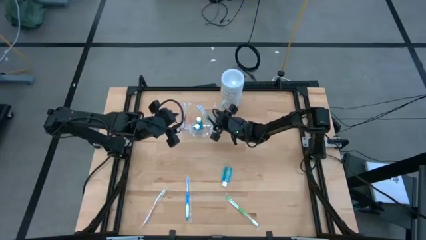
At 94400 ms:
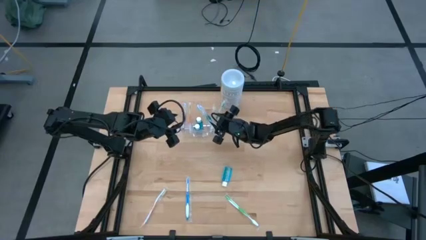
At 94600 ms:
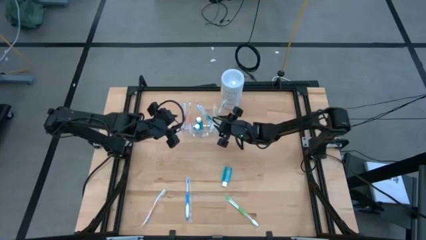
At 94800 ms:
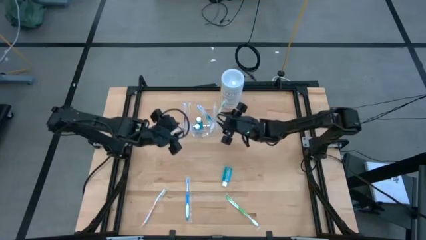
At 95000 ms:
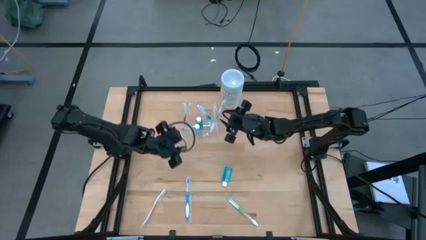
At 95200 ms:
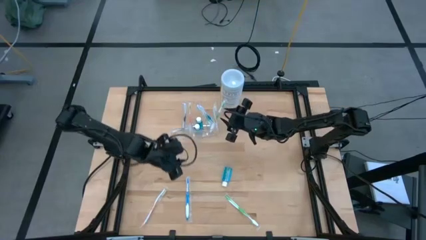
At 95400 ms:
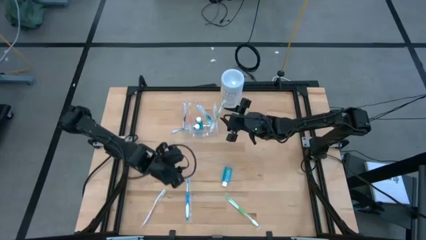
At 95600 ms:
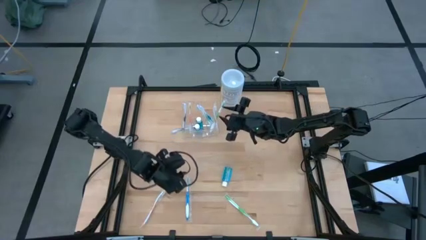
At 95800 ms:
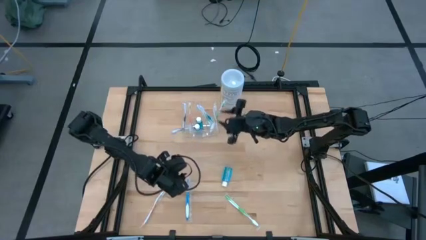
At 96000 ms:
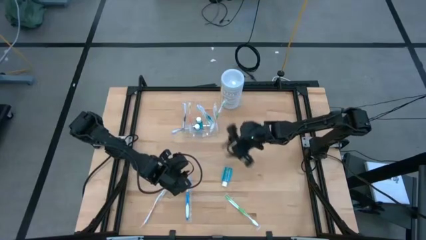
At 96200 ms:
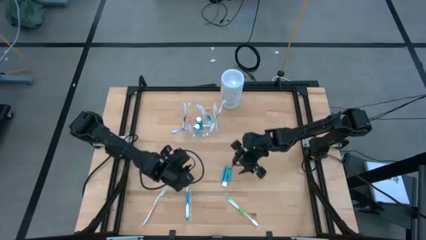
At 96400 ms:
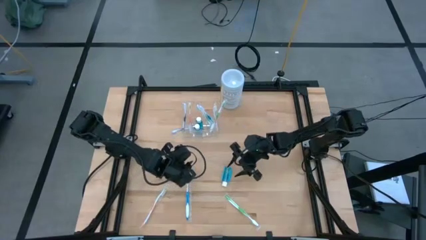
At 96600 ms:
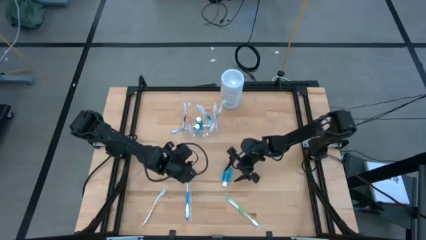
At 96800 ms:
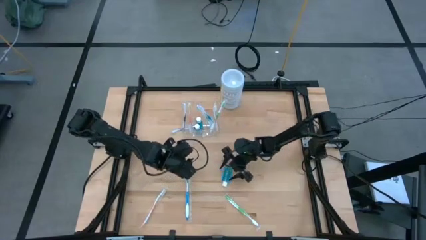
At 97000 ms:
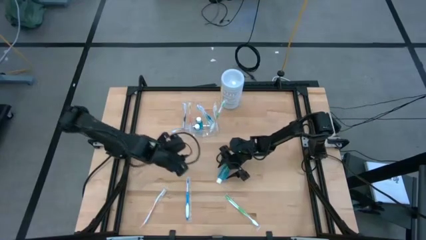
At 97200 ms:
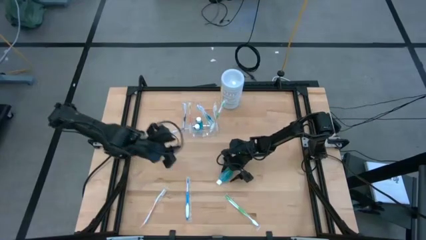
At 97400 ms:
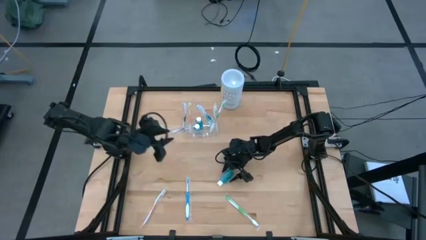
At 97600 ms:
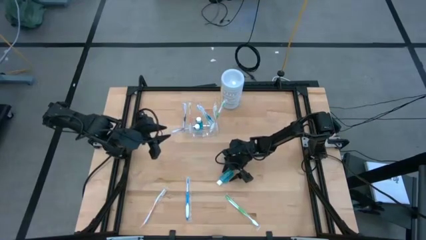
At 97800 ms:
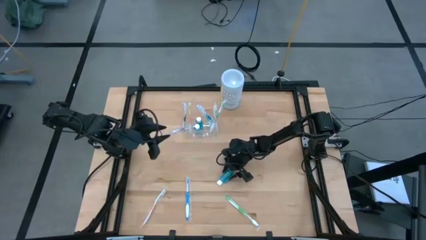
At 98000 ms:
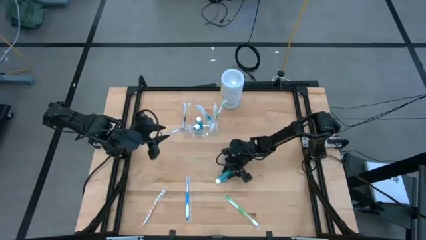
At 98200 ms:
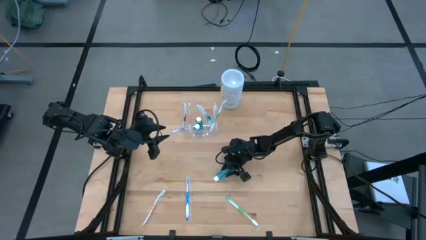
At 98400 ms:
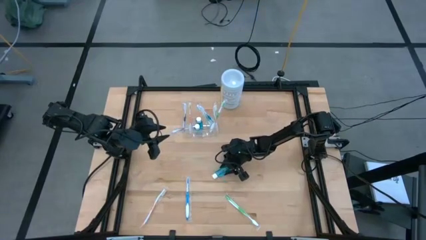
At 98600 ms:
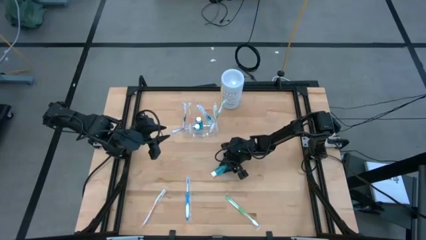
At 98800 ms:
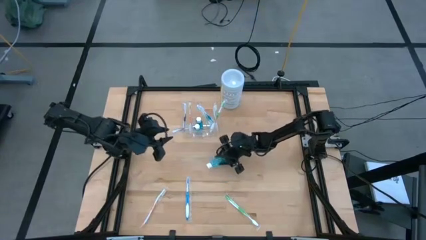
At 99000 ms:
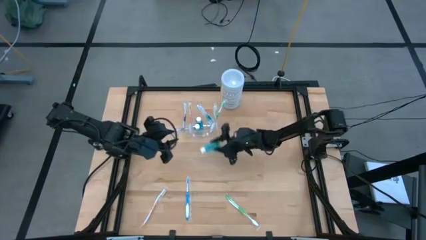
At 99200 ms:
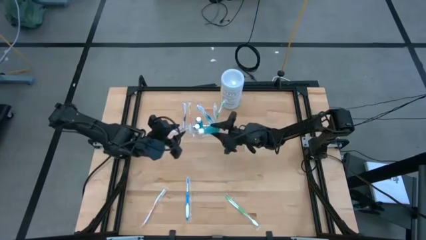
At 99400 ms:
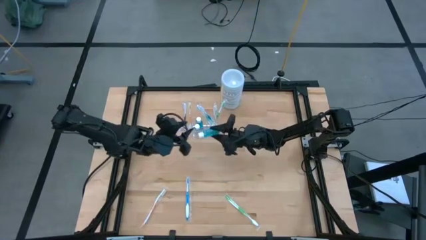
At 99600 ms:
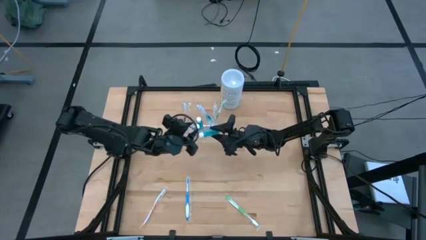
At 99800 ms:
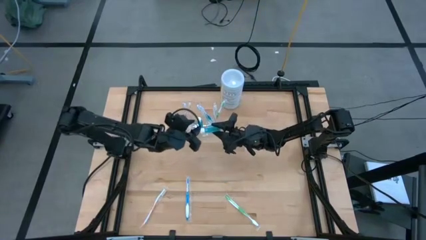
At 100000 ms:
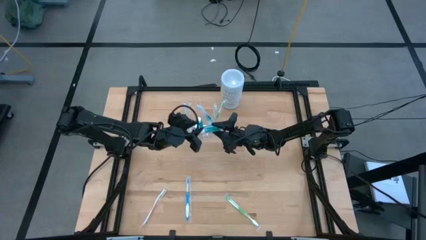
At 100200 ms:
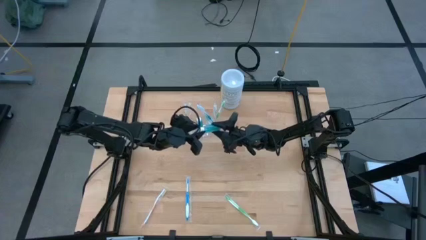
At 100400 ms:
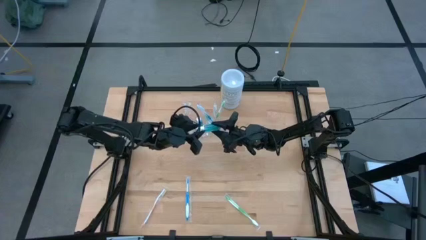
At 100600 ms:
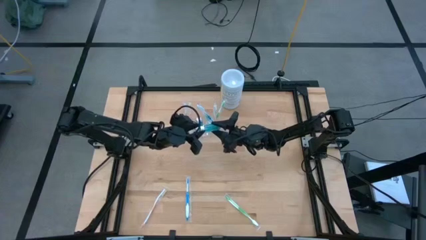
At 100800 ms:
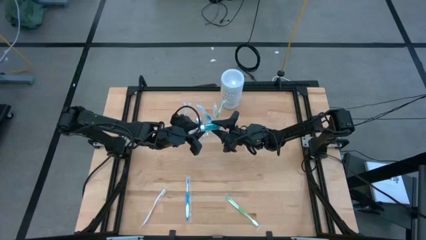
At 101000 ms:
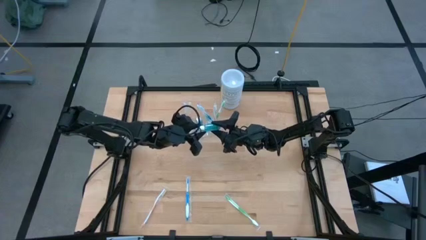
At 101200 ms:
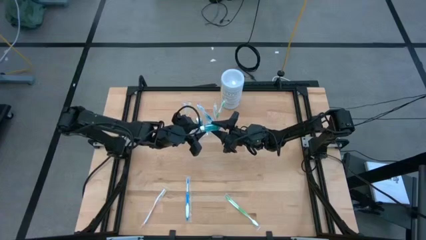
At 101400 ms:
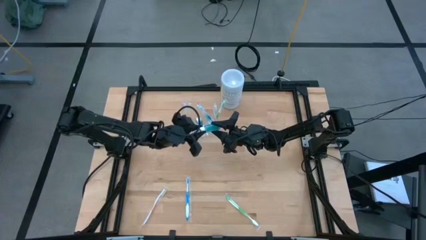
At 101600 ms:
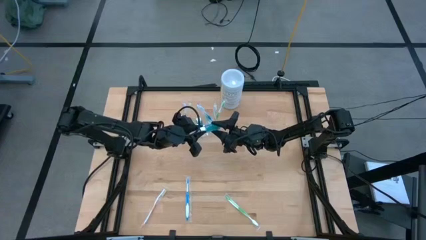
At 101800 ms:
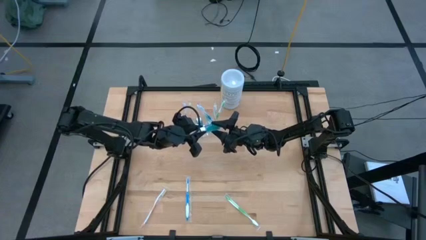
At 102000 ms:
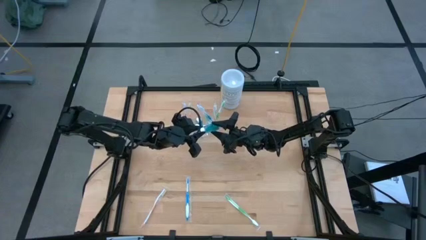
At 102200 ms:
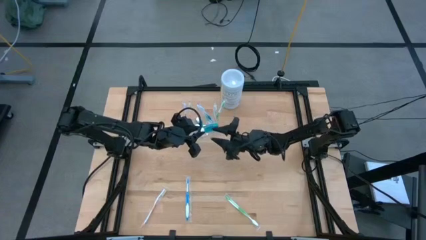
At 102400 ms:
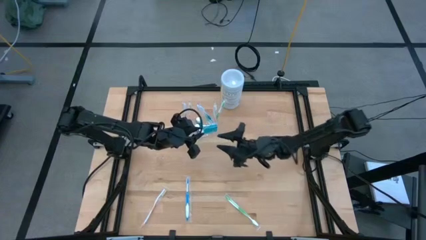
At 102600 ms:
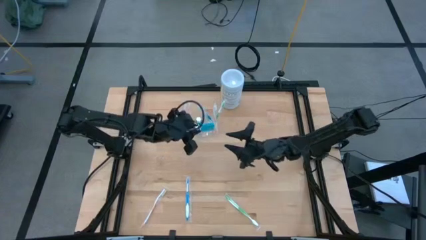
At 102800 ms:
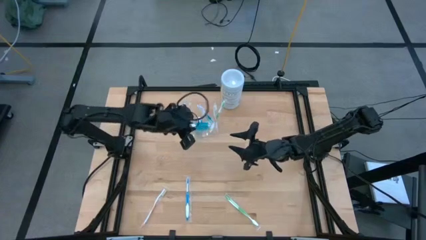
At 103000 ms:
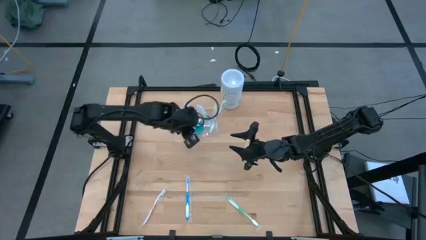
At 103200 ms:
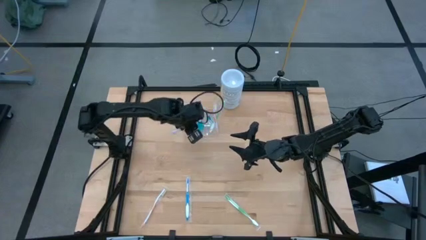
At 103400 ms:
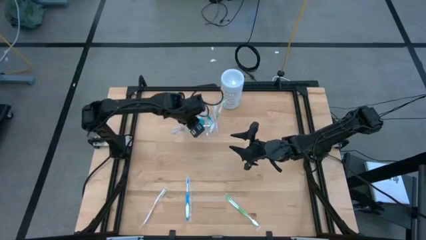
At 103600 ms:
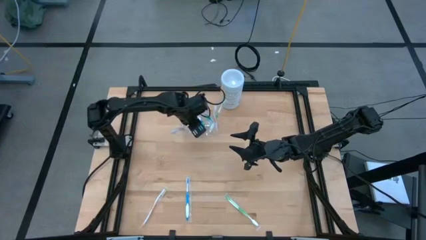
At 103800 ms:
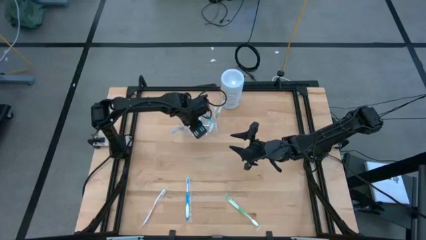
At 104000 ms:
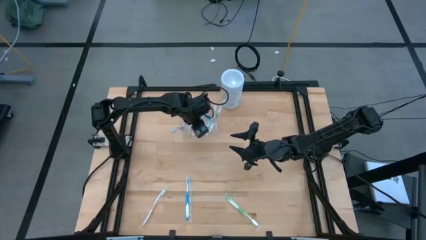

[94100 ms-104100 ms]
Task: Pick & Place toothbrushing station
Put the blue mouthwash into the transparent organizer

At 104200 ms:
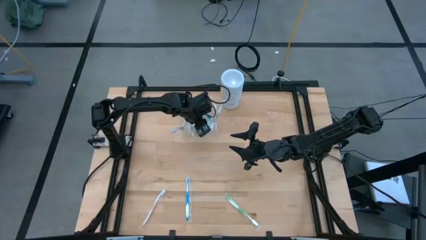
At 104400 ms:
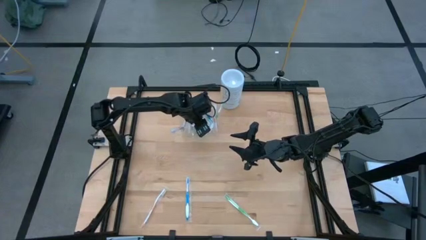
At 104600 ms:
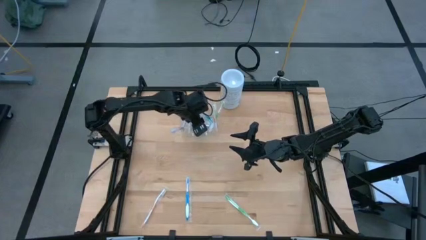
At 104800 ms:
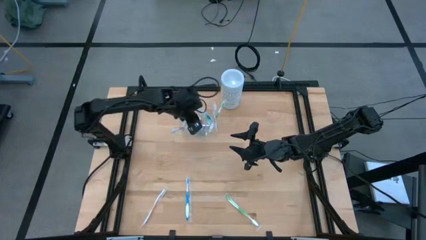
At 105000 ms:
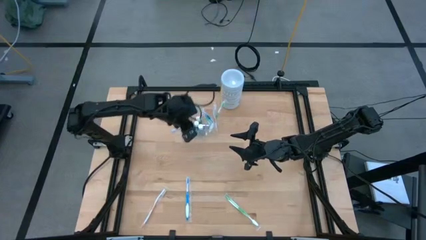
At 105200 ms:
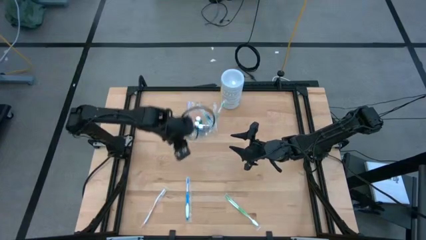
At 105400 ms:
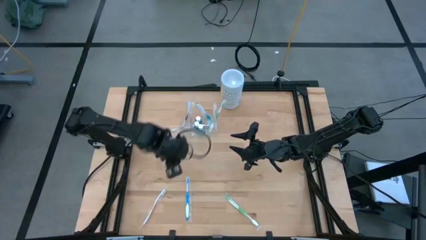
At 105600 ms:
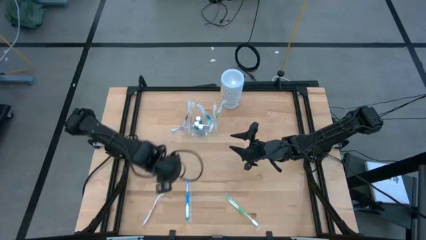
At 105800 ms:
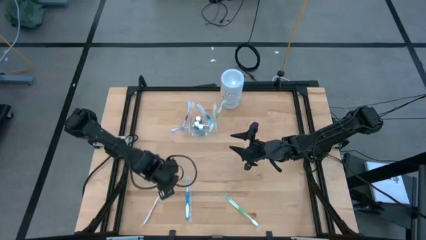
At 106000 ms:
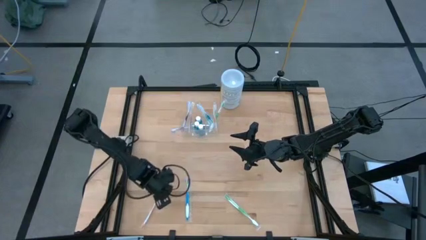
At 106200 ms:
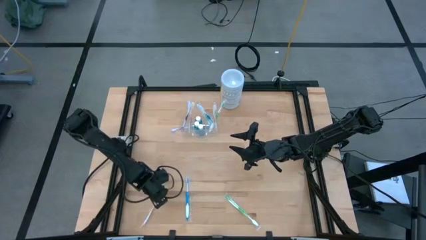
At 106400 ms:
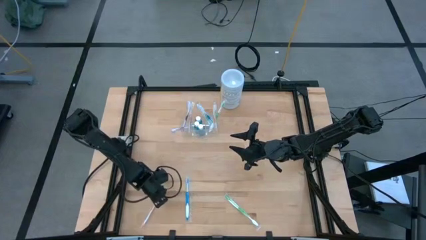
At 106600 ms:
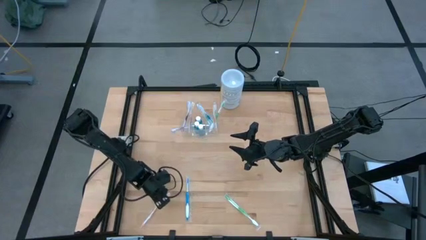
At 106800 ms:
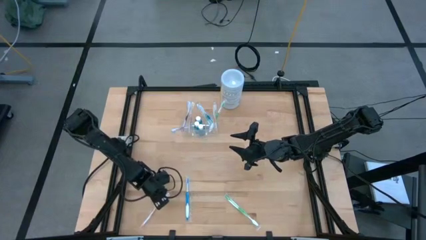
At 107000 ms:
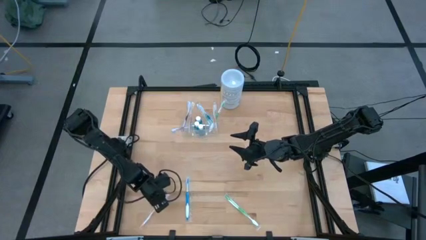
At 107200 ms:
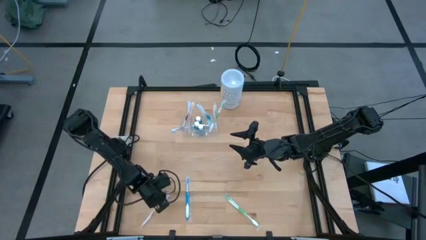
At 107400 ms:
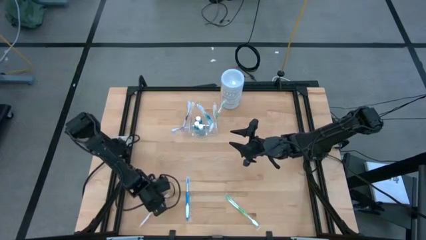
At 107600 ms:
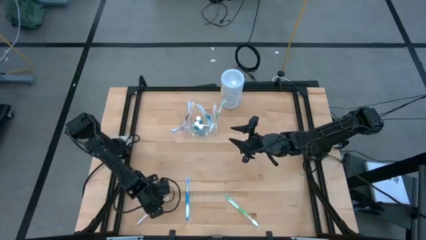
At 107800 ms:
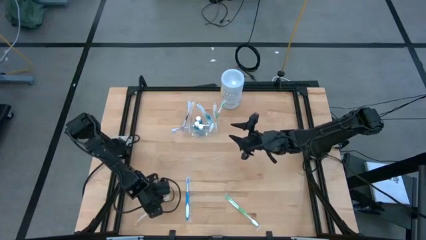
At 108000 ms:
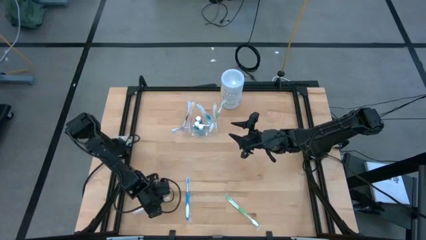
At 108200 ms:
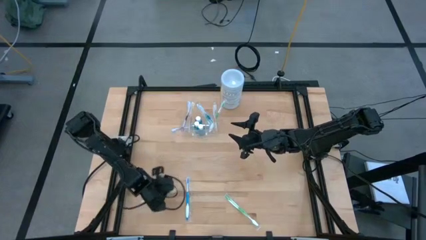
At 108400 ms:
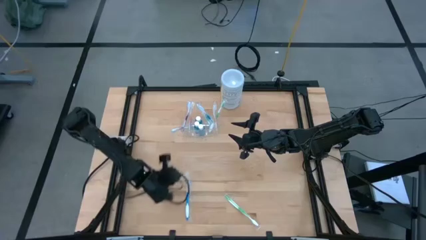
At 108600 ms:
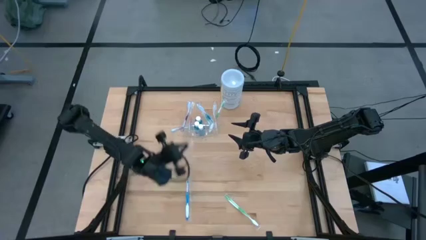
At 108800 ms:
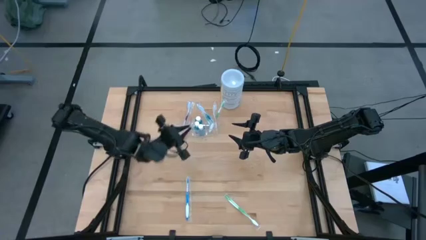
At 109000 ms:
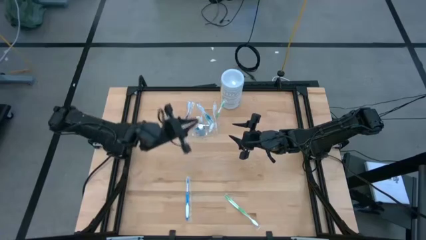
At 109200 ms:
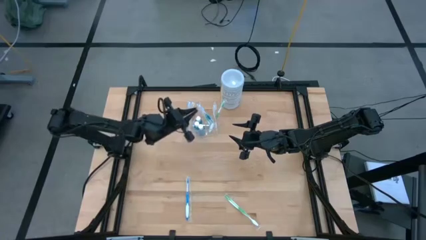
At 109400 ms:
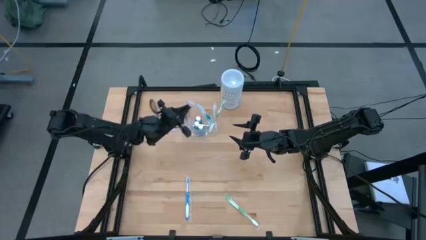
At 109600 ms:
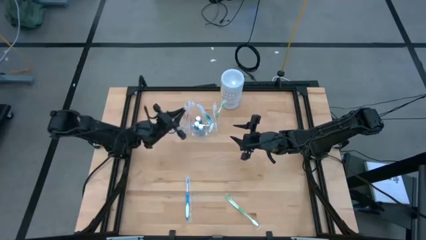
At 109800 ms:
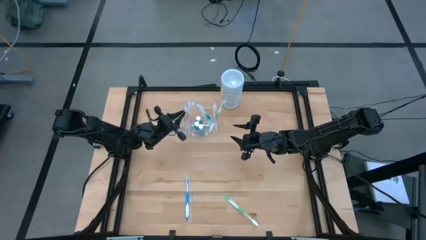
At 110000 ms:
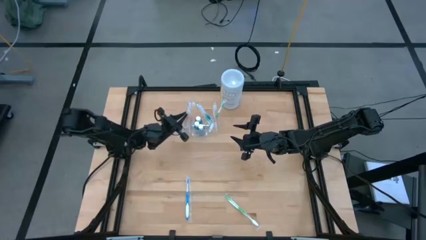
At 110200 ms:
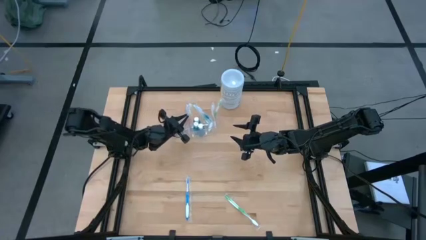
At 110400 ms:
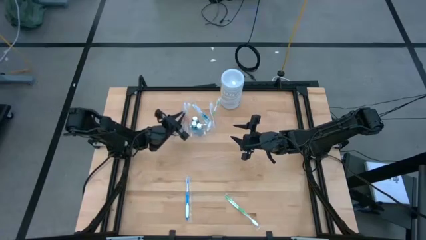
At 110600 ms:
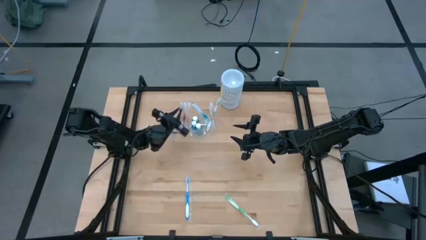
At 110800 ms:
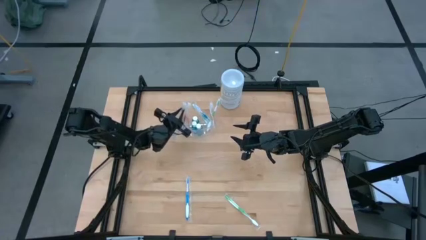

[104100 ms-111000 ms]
Put the orange toothbrush into the transparent organizer
